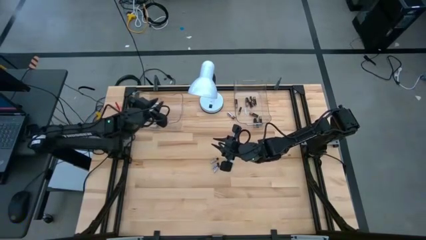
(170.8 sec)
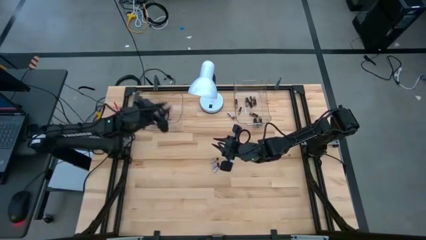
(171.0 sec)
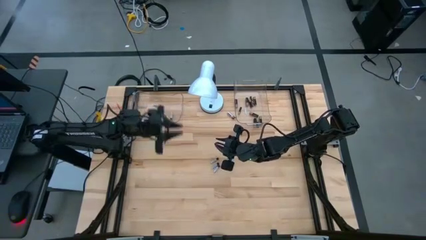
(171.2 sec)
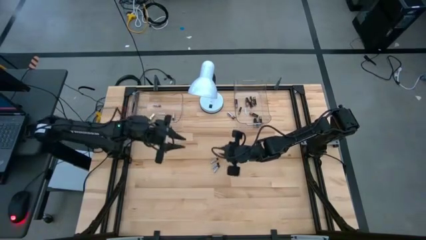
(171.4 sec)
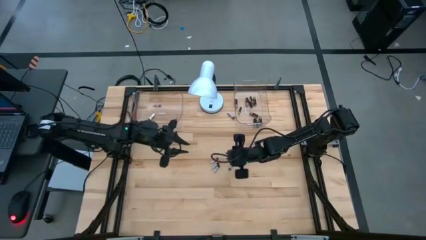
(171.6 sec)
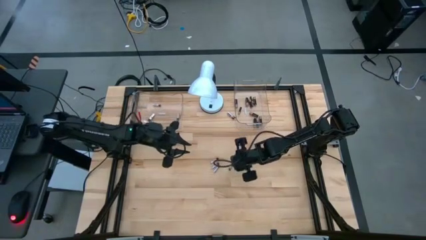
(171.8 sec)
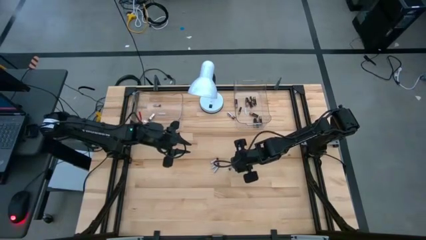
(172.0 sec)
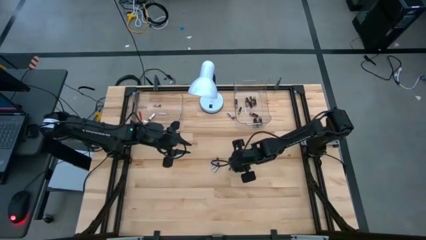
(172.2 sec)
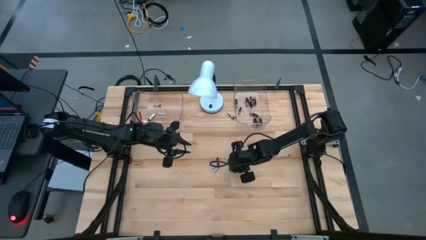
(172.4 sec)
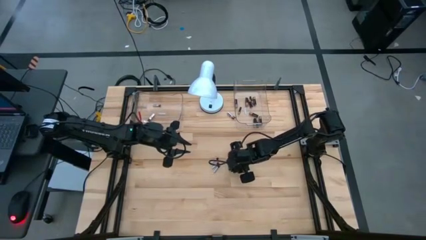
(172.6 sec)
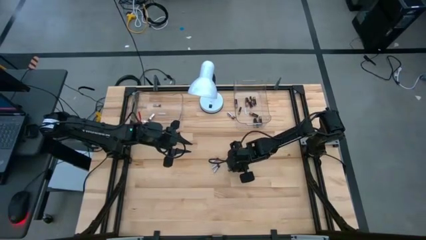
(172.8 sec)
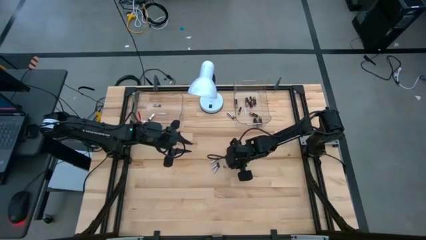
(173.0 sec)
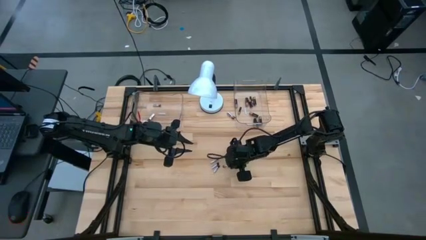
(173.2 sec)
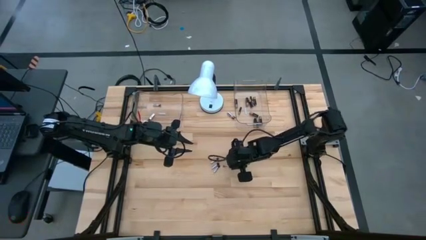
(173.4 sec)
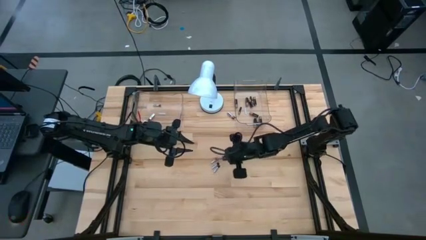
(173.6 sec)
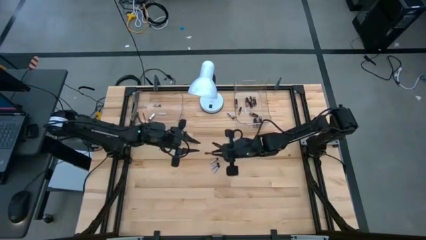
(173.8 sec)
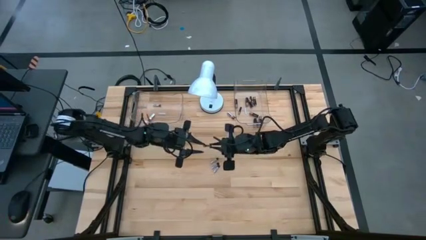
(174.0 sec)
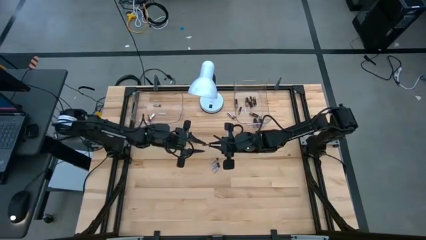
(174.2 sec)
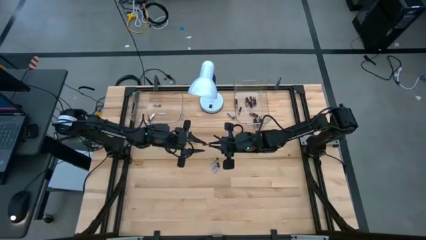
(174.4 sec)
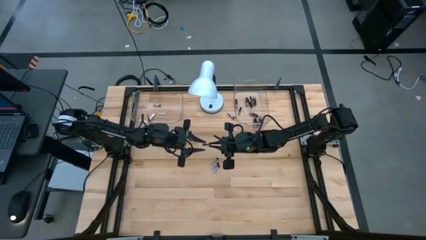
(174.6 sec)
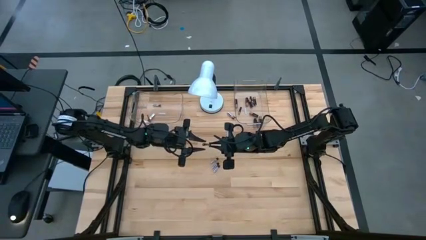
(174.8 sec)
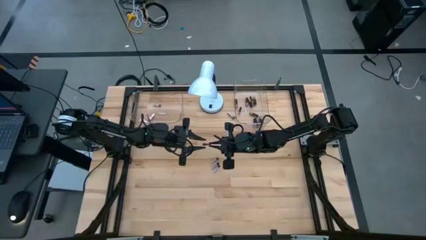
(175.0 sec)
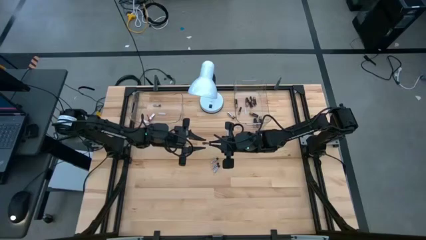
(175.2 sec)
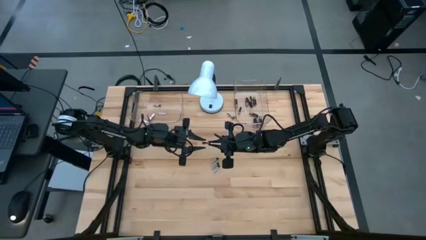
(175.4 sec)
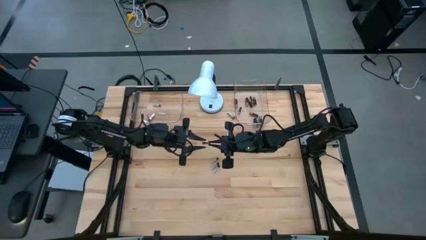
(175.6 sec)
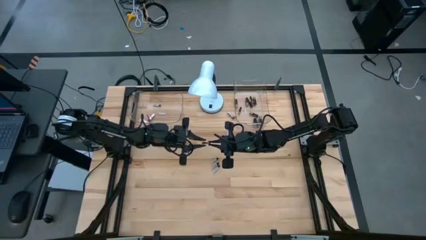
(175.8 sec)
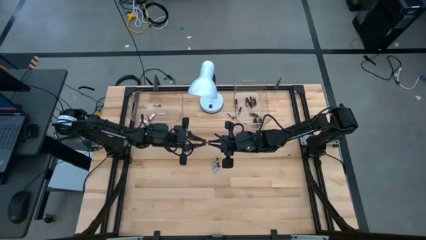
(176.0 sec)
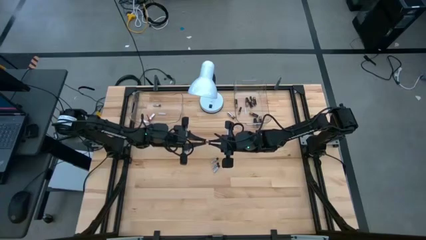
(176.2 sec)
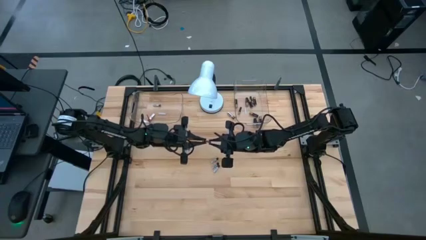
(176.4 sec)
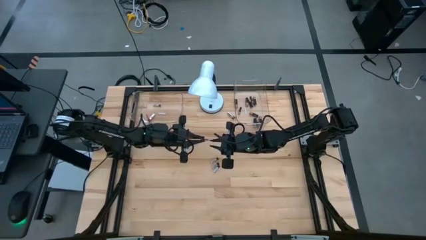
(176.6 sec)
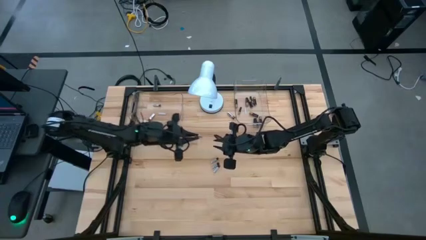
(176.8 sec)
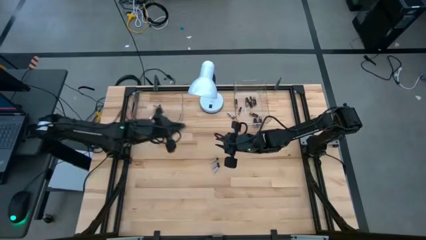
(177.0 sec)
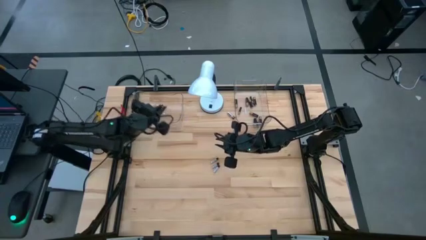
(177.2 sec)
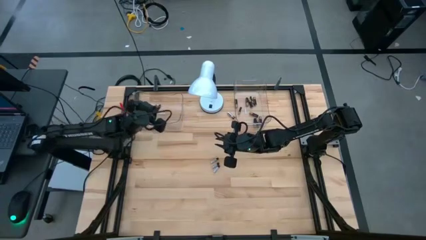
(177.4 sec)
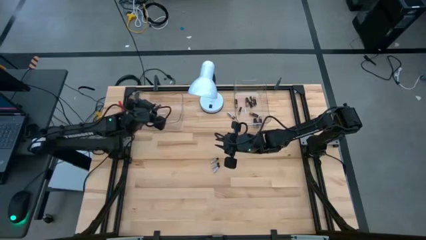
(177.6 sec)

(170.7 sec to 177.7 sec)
Task: Sort batteries
Put the silver battery in the transparent bin

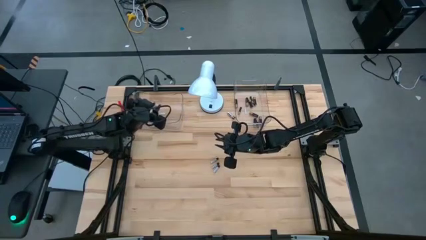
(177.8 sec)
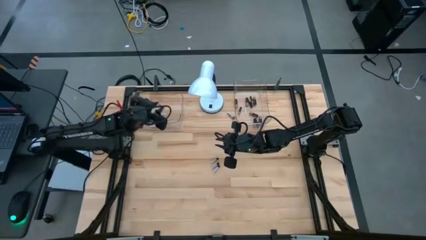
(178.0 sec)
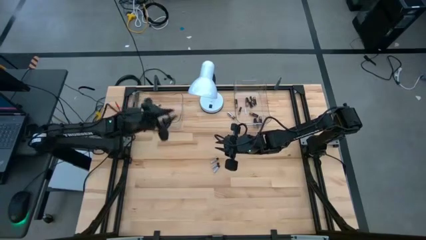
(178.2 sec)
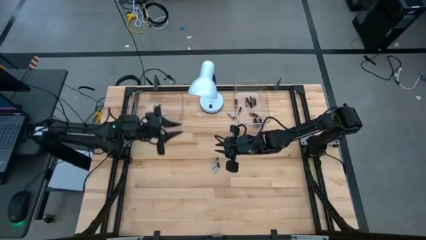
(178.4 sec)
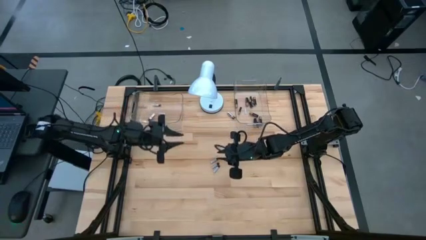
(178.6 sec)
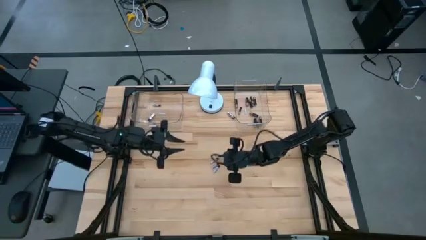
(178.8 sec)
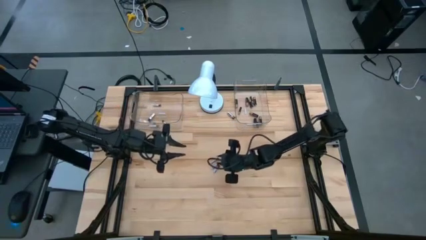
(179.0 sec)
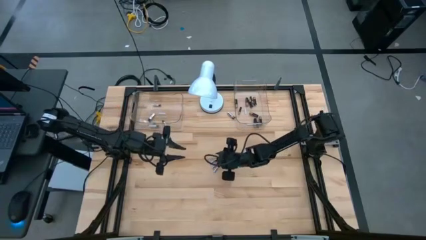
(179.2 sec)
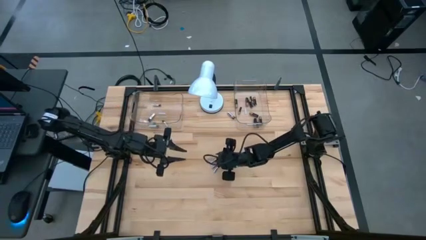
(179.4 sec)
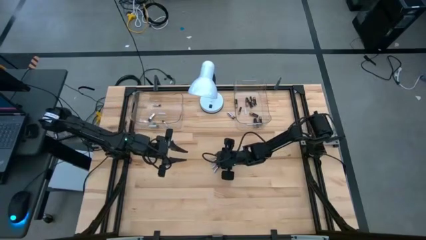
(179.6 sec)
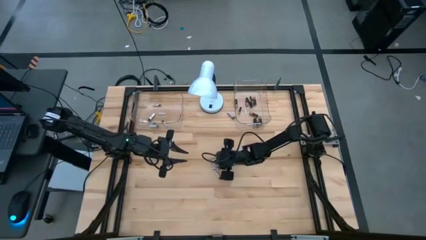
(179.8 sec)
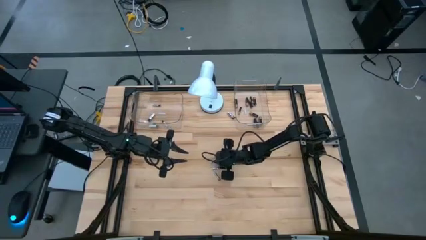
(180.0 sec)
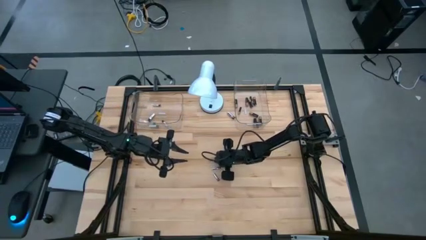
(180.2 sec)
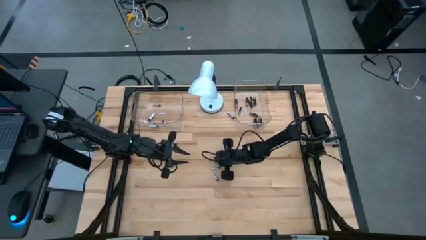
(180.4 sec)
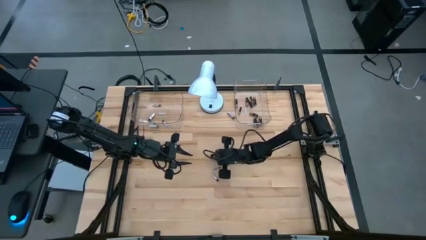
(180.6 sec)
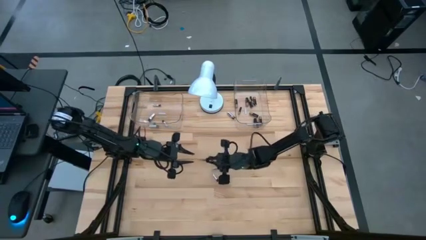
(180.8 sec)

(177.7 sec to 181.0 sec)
Put the silver battery in the transparent bin

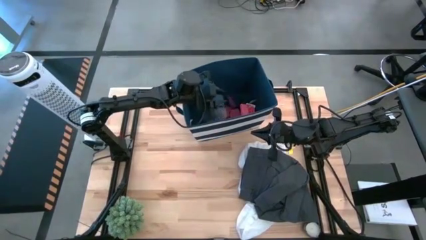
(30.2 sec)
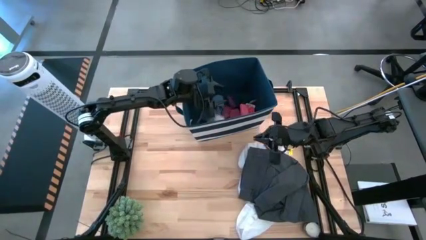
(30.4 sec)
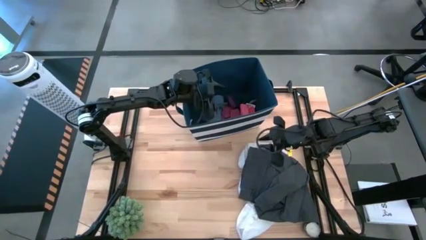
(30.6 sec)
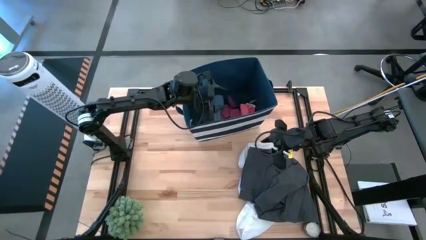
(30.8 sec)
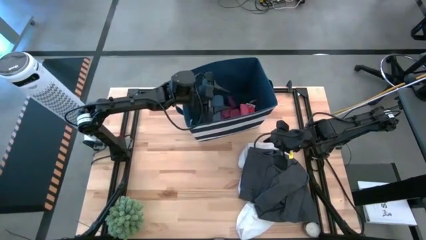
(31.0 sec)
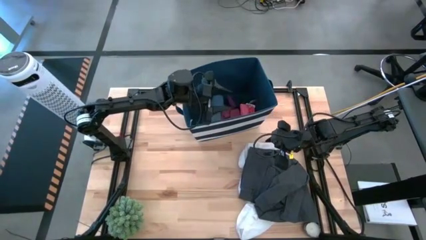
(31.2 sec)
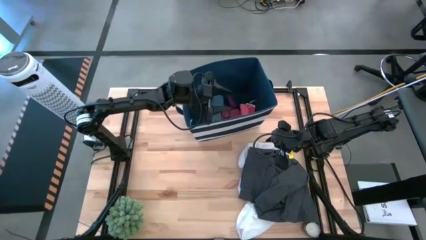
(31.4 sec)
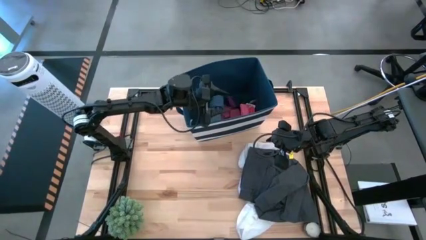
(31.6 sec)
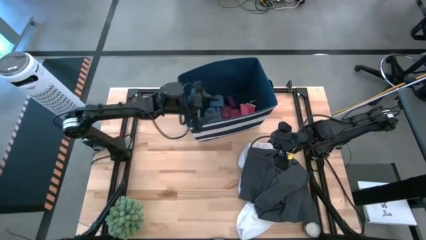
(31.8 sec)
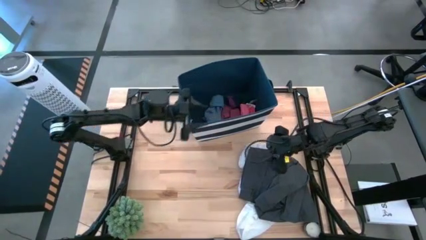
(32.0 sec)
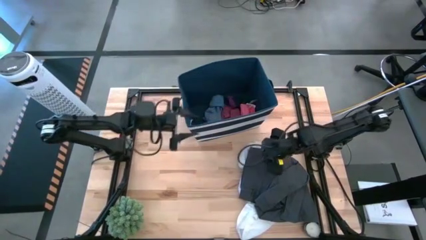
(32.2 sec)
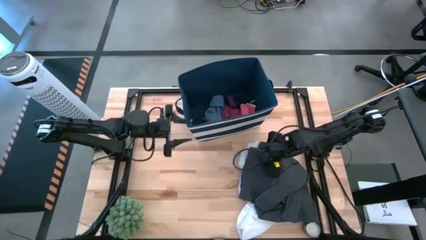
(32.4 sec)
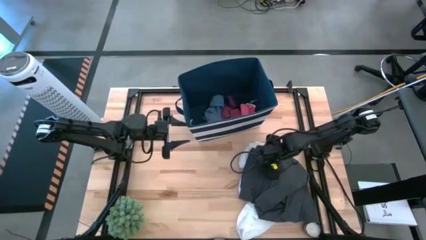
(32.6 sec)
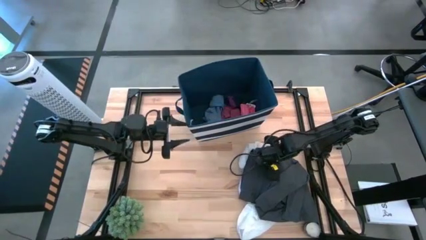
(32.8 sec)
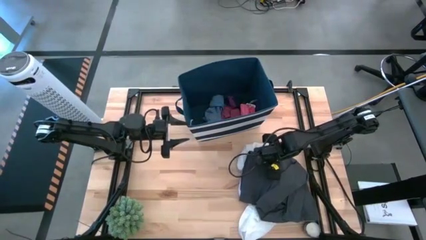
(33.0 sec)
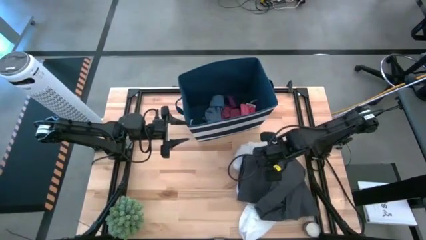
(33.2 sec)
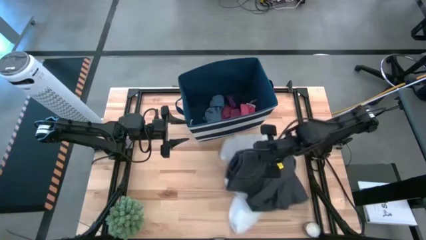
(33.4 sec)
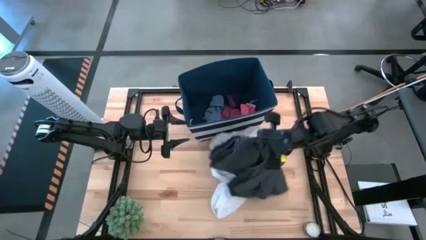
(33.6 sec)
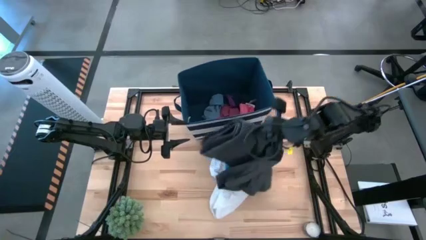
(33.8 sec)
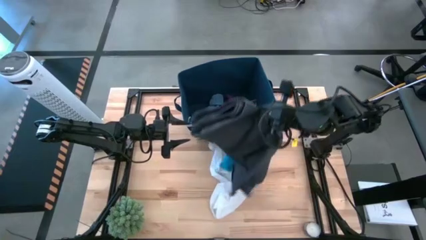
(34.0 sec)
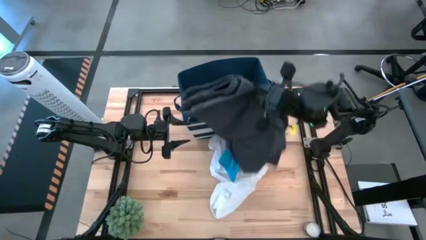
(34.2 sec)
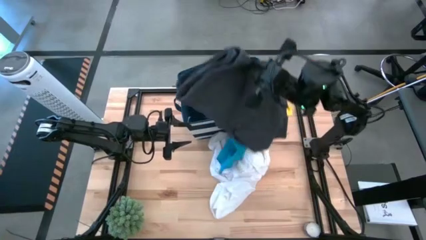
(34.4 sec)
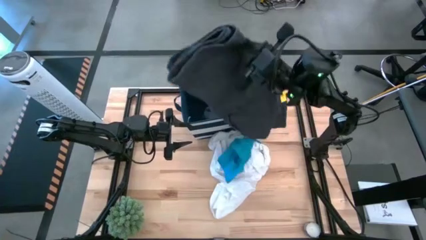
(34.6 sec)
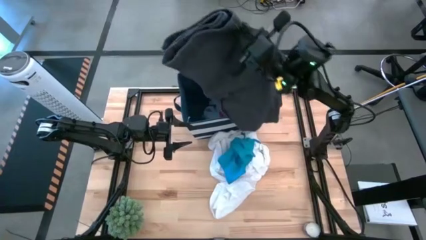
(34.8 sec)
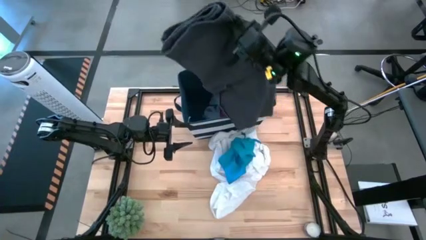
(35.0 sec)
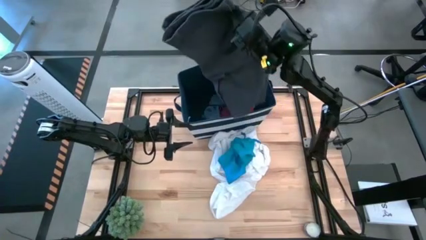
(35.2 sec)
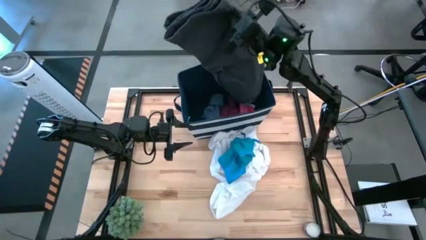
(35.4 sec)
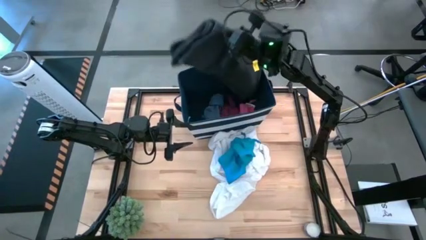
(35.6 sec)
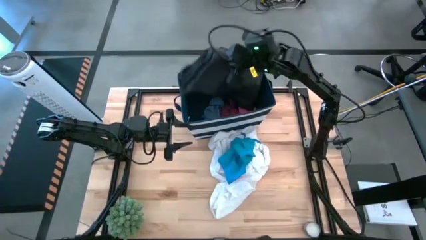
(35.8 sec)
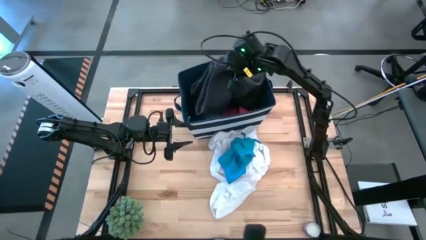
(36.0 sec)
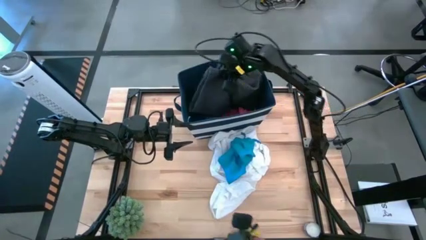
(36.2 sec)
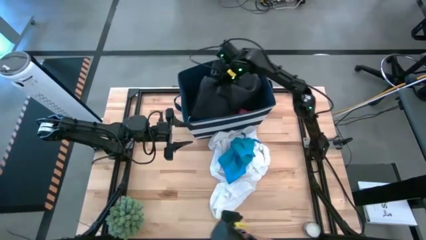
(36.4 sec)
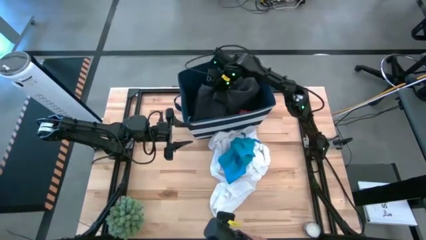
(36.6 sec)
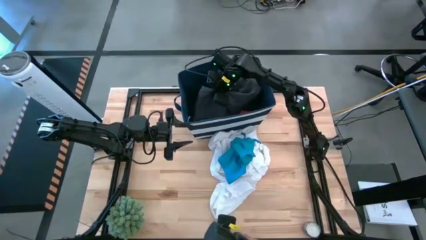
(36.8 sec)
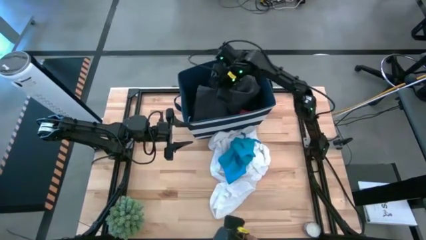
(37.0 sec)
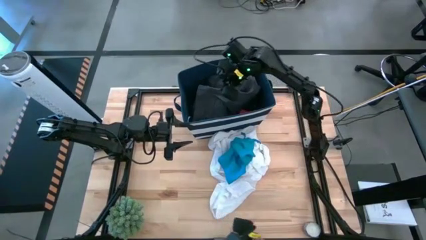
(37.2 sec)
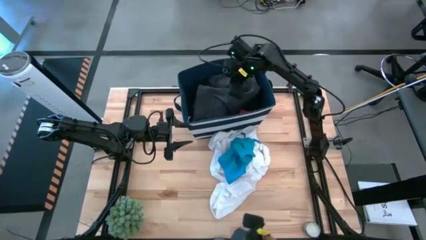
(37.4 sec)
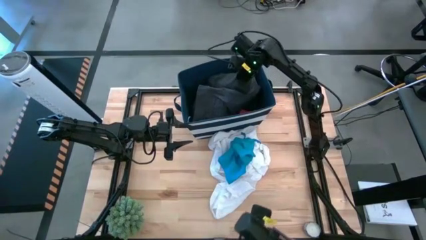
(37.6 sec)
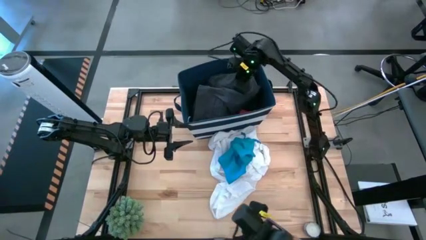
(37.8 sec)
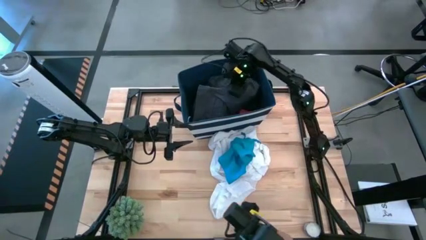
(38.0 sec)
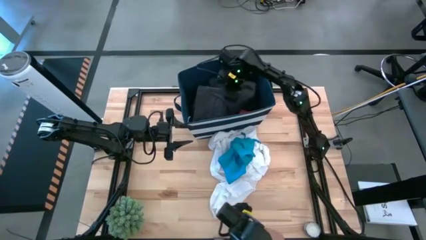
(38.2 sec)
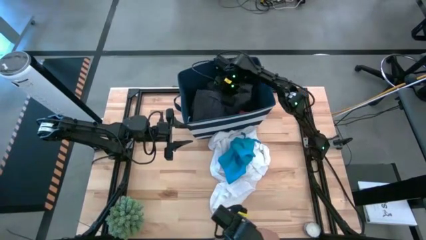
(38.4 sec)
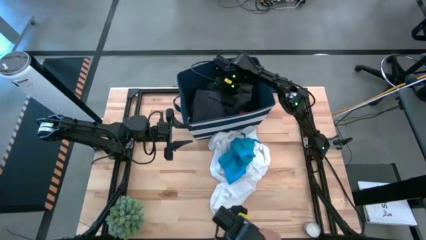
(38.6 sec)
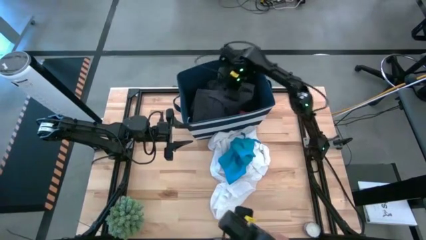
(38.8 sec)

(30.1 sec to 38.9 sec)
Task: Sort clothes
Put the gray shorts into the laundry bin
